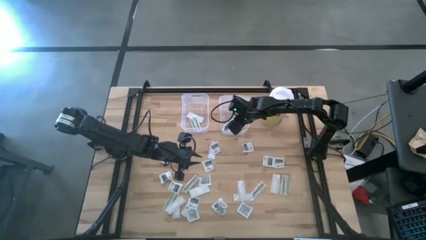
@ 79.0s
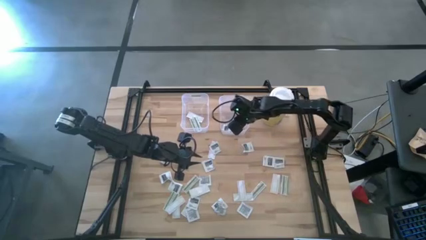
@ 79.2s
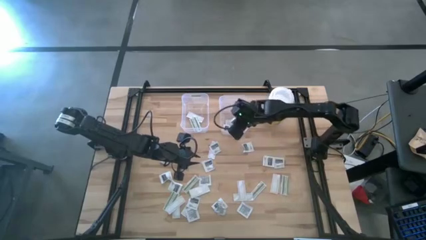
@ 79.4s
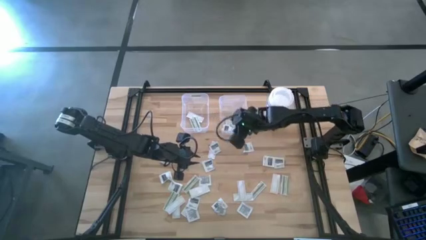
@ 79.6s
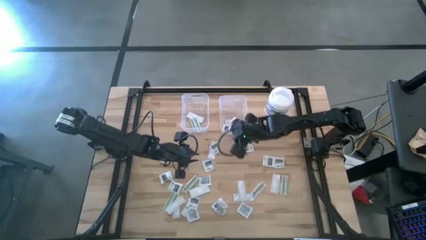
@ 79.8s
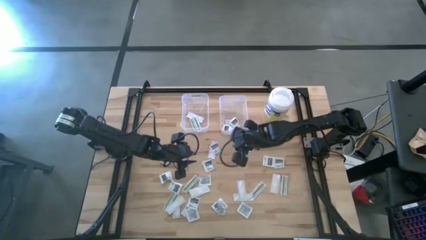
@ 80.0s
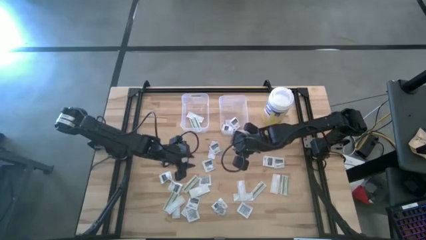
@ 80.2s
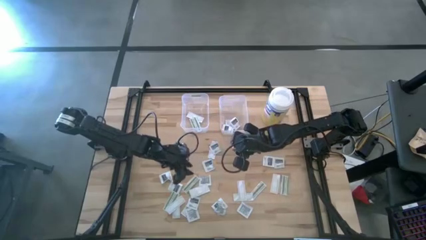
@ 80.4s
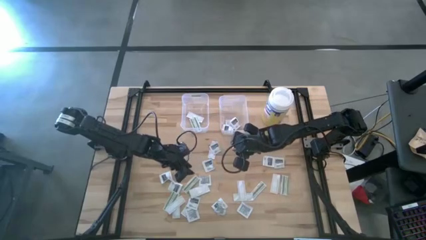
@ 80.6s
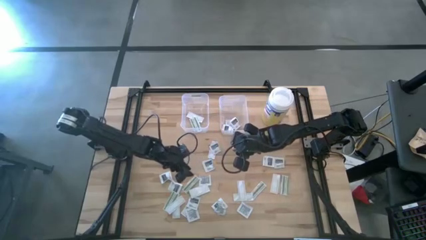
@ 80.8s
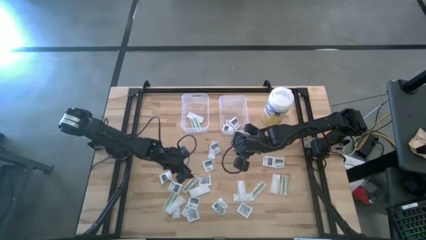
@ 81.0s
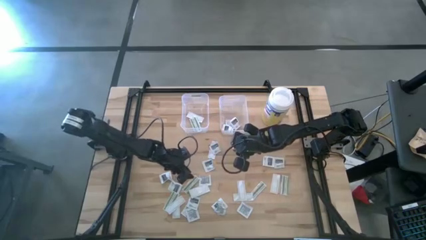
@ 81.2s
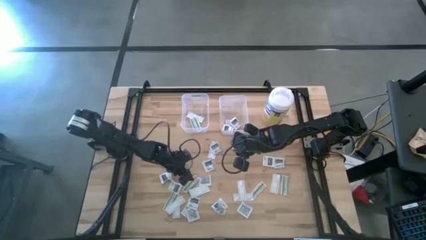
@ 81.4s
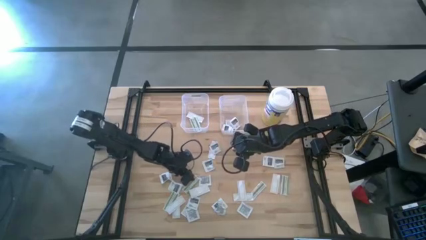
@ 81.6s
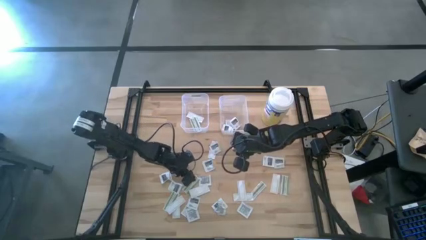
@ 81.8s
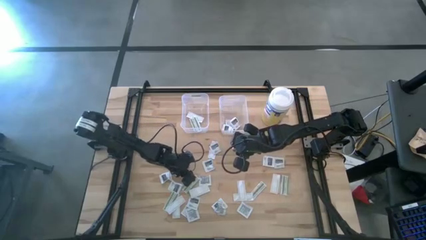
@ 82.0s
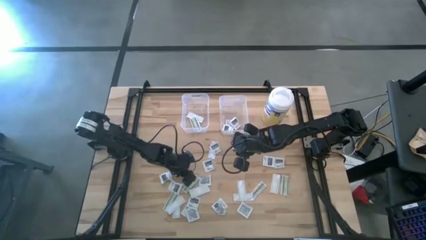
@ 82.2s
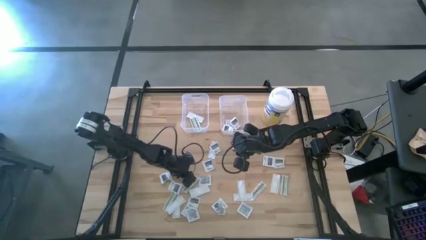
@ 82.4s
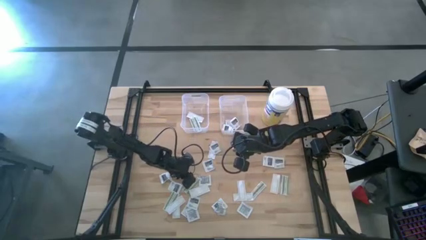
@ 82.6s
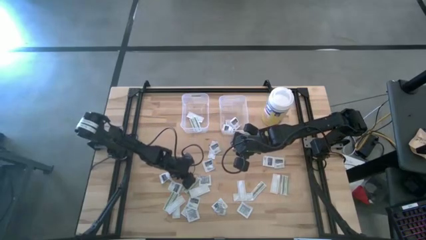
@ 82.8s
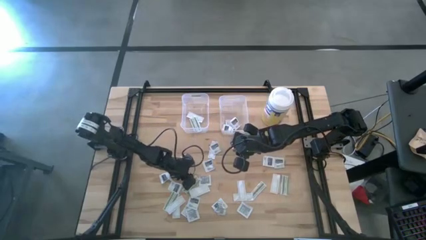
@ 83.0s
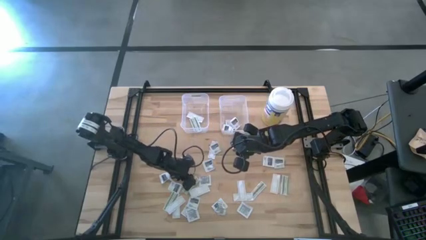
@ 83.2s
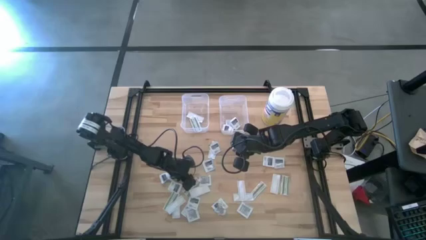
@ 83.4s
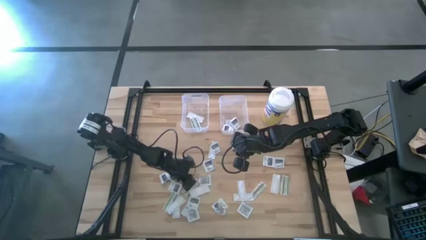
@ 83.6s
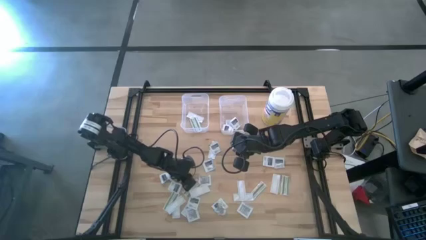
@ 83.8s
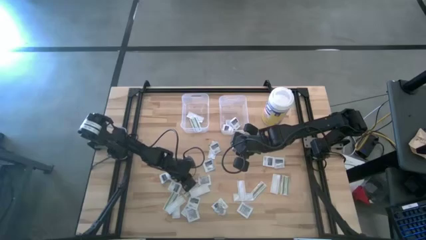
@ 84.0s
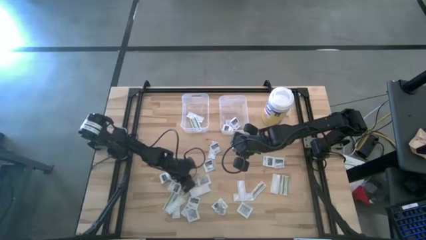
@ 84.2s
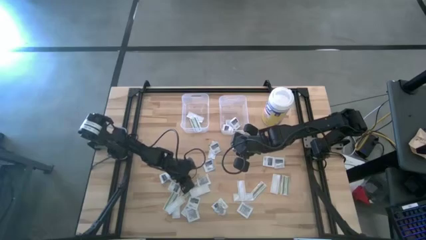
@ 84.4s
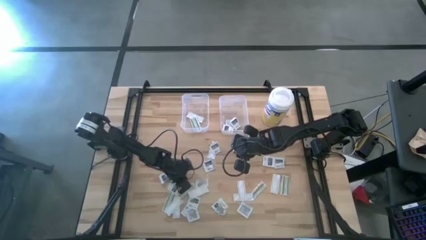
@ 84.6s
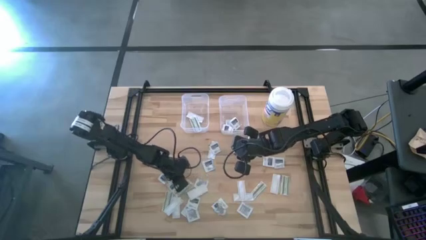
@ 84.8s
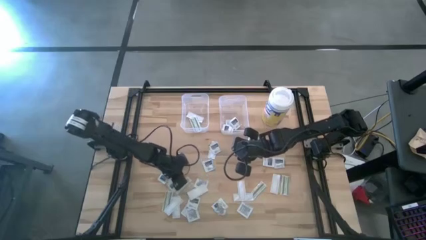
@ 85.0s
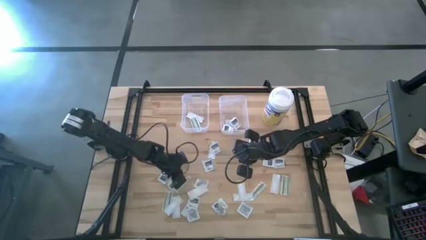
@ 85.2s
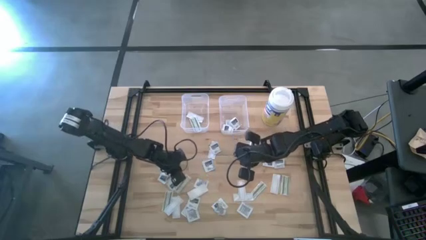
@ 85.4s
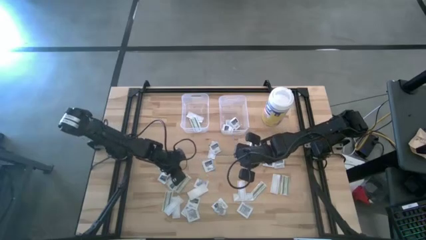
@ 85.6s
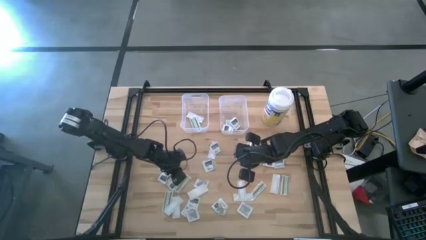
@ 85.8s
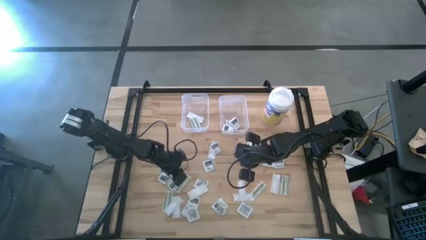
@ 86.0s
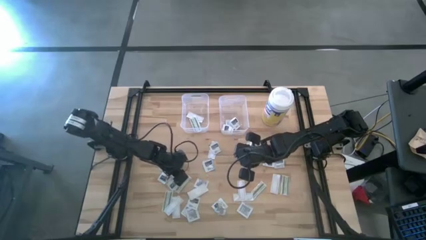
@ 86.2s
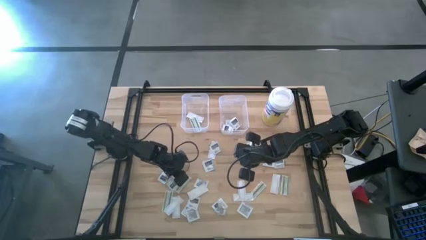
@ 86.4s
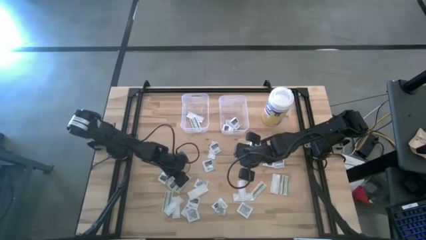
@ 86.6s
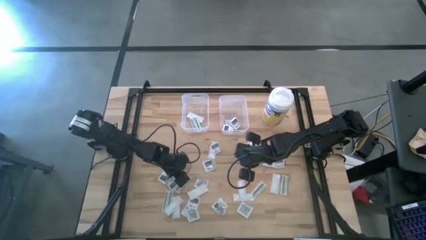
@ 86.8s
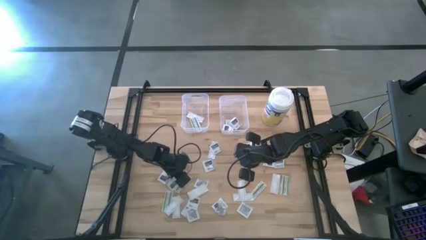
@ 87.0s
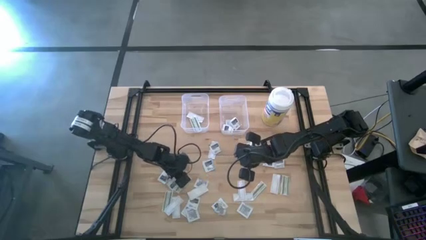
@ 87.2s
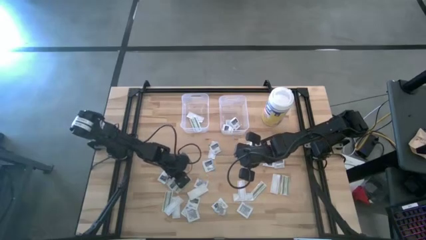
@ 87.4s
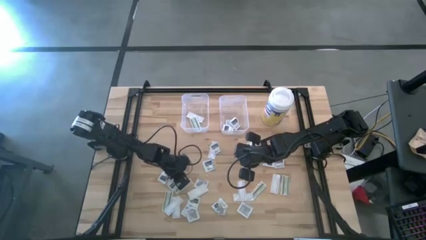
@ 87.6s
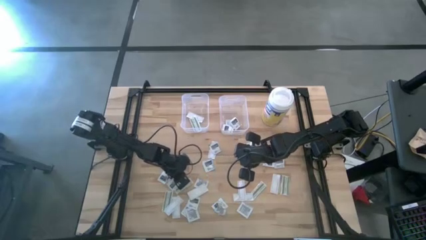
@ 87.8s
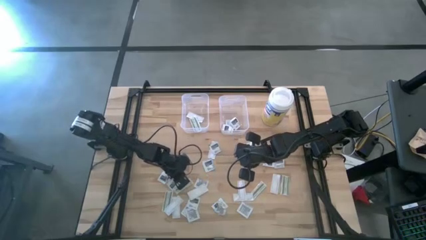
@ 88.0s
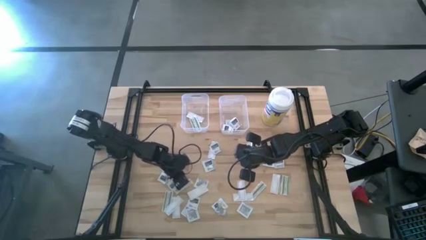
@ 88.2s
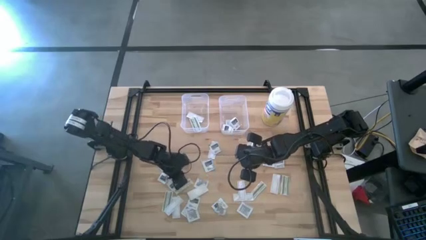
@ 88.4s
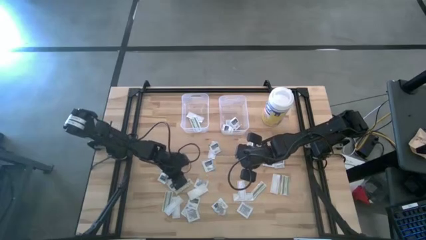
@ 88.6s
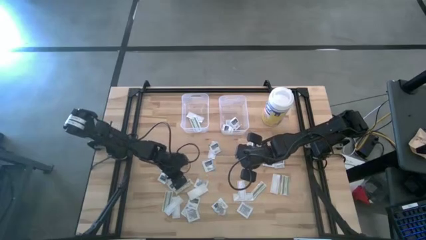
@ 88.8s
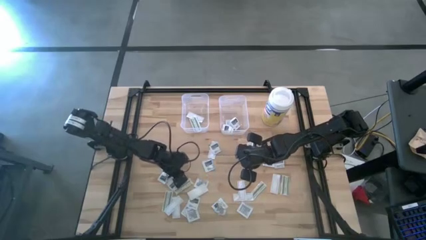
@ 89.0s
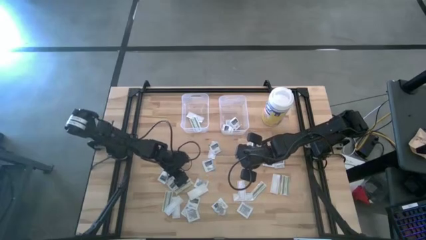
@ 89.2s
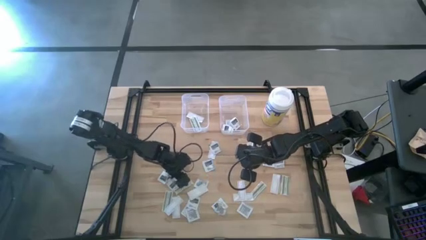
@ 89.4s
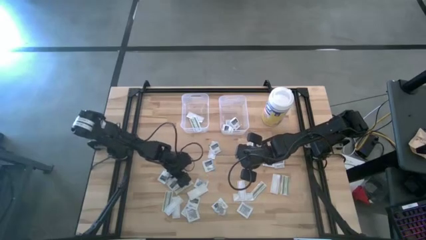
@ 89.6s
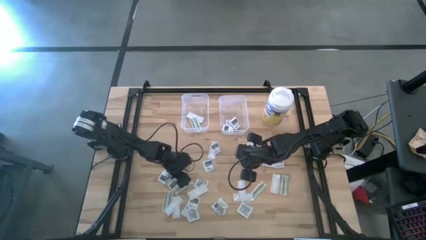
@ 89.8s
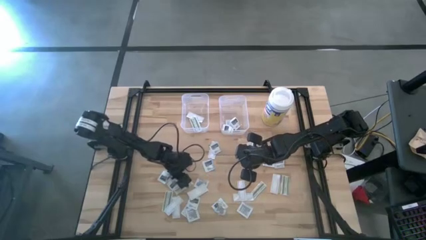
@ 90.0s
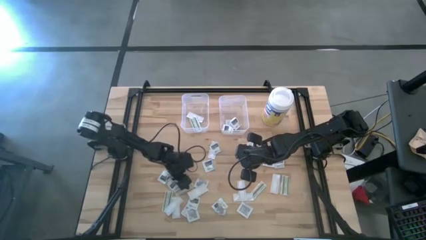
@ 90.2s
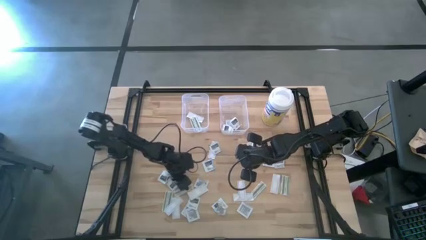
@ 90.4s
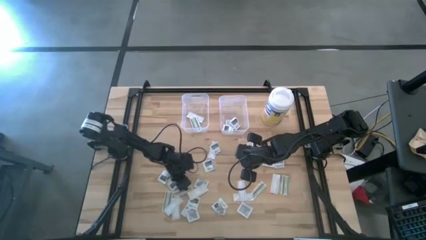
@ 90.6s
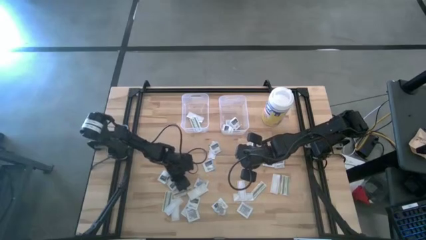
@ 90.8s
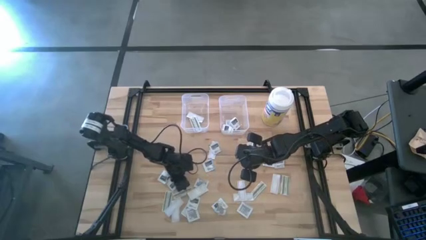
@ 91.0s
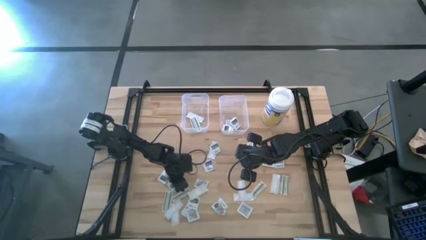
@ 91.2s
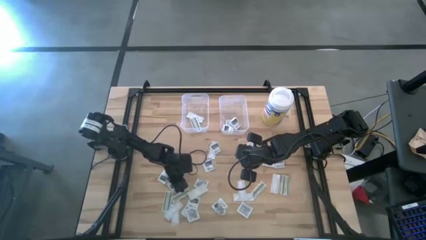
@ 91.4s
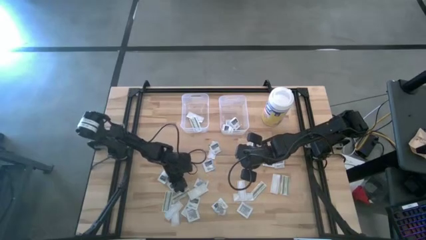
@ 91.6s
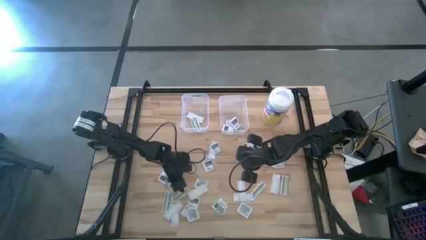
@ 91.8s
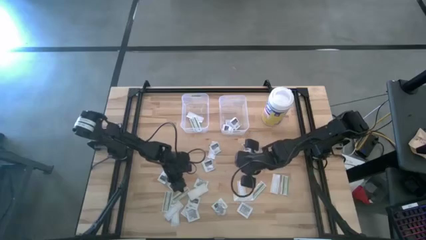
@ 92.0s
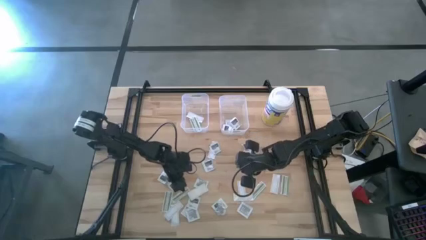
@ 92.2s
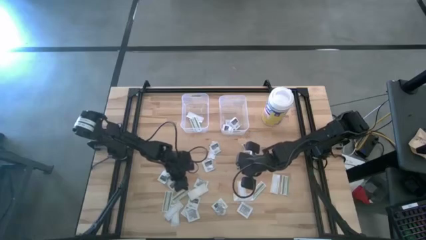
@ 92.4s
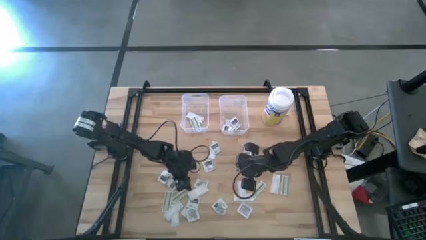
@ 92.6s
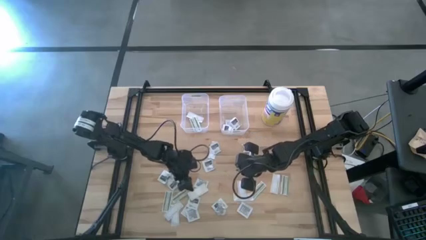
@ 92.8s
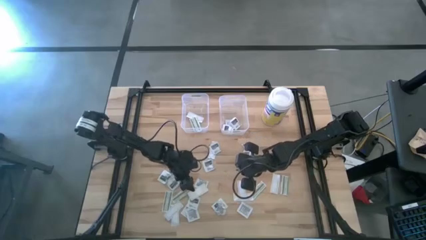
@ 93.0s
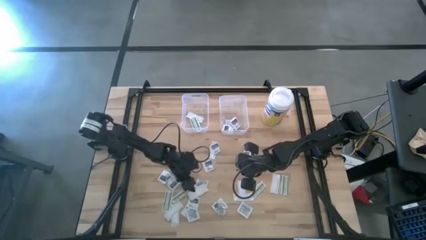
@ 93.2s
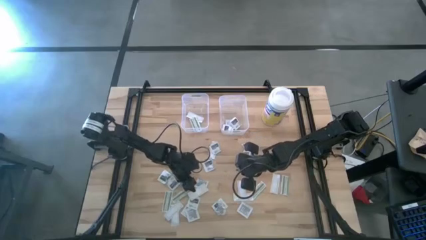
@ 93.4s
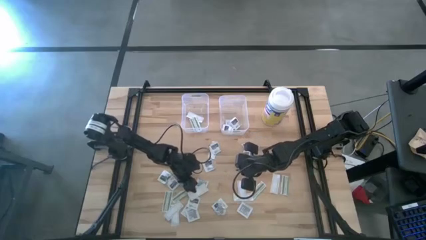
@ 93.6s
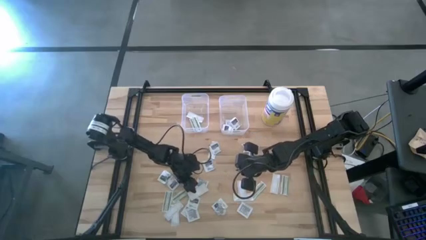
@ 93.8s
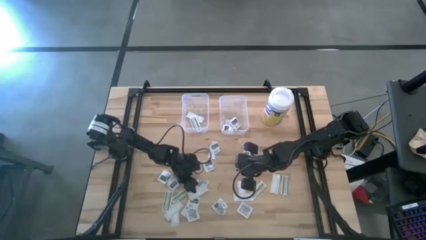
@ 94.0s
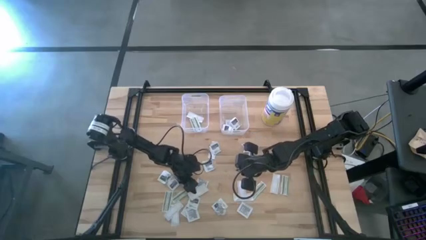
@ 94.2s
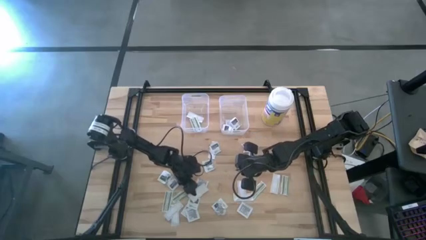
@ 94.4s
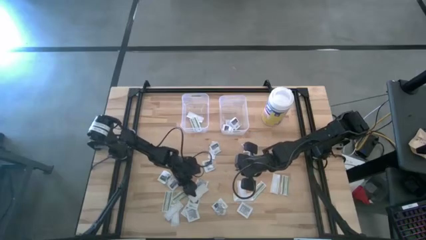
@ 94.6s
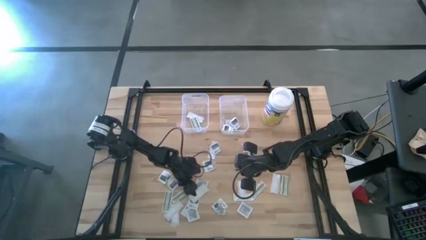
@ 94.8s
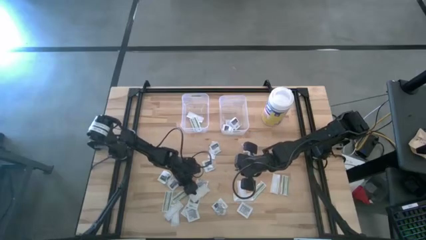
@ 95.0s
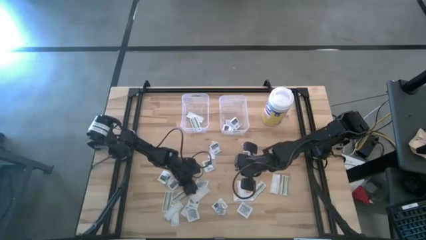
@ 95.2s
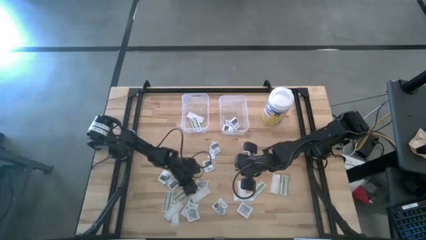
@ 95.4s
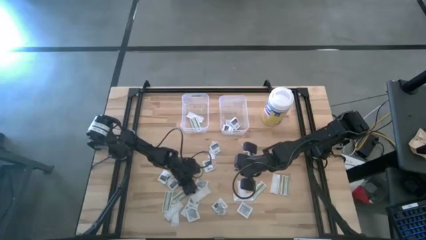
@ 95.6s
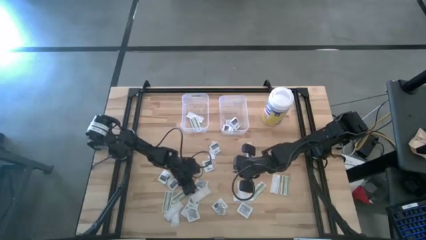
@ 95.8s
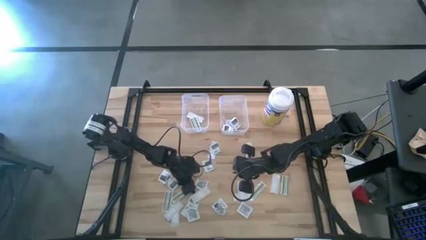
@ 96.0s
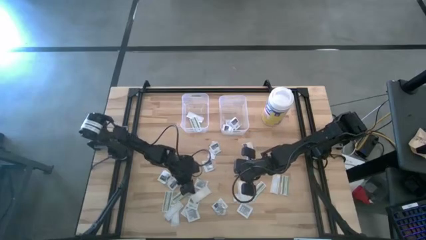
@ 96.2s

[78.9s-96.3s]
Task: Pick & Place First Aid Supplies
Put the green bandage pack into the left transparent bin
